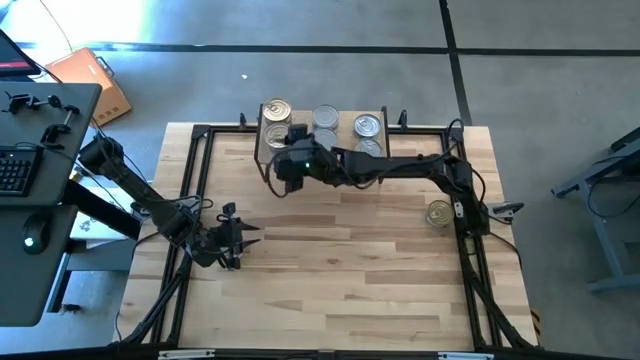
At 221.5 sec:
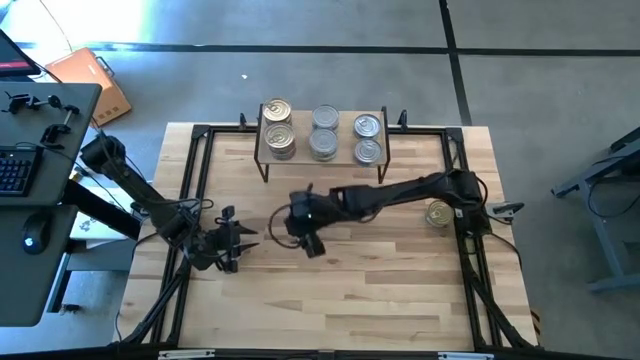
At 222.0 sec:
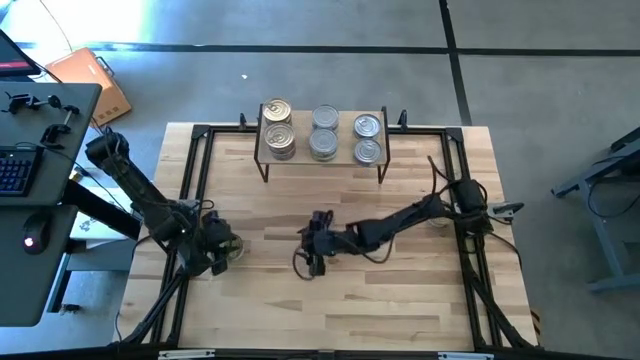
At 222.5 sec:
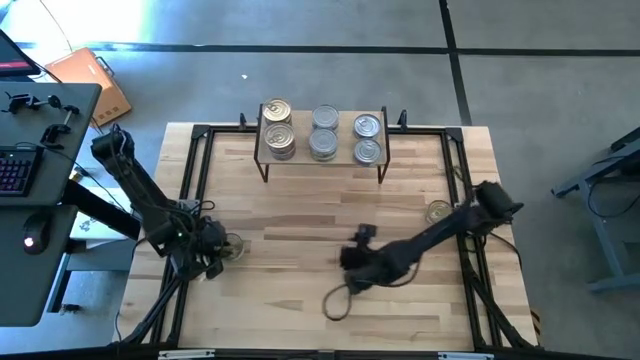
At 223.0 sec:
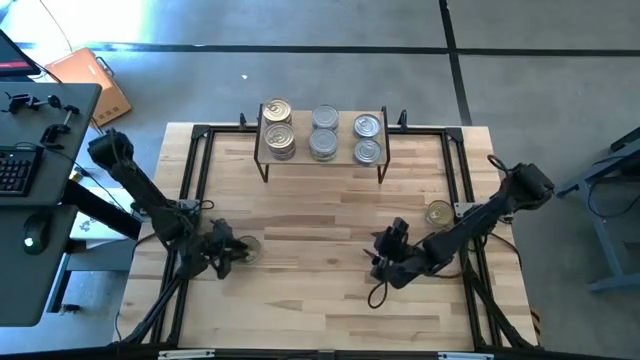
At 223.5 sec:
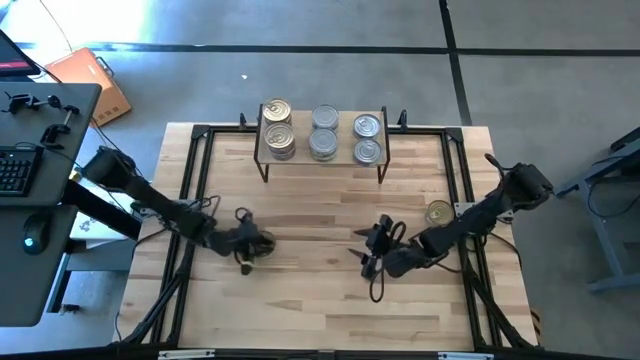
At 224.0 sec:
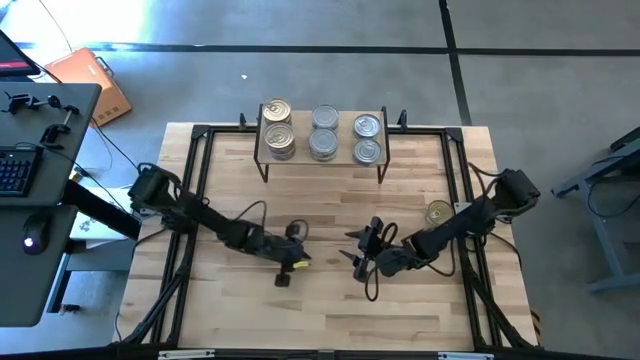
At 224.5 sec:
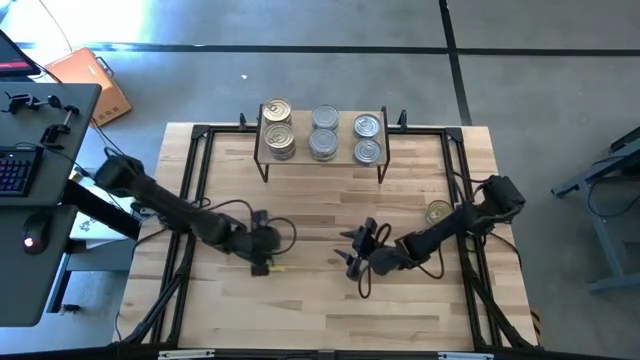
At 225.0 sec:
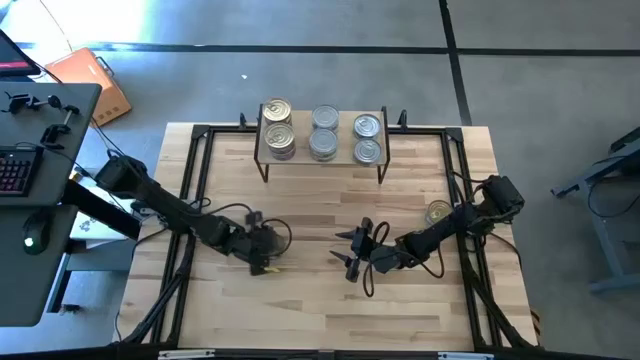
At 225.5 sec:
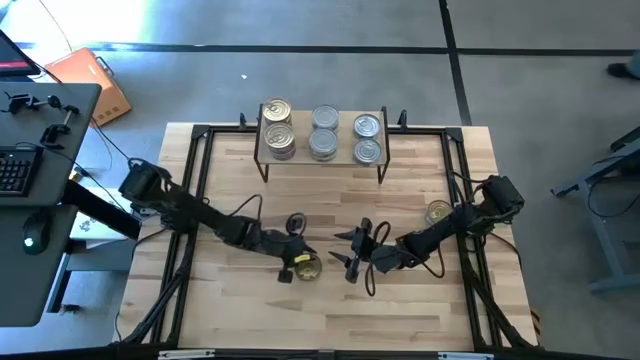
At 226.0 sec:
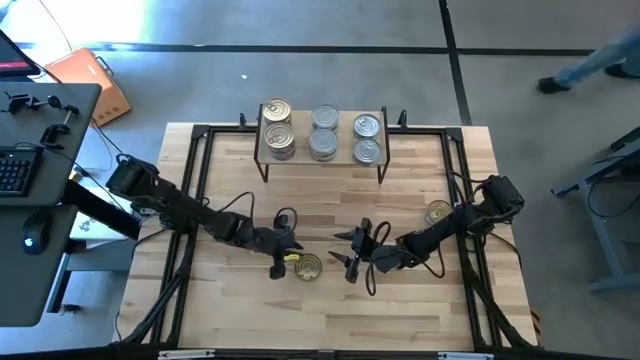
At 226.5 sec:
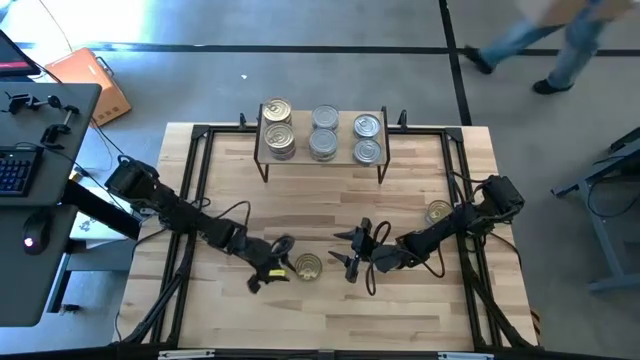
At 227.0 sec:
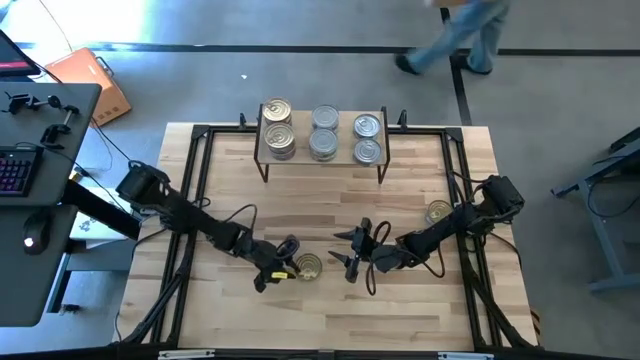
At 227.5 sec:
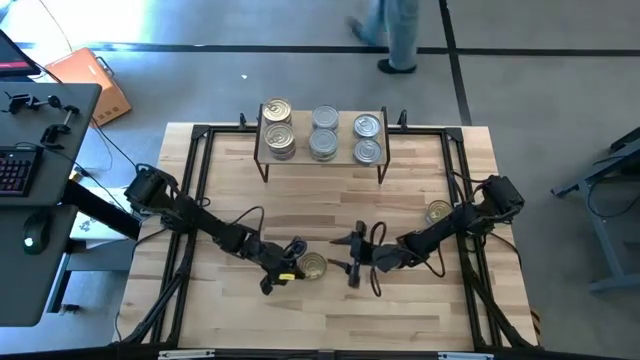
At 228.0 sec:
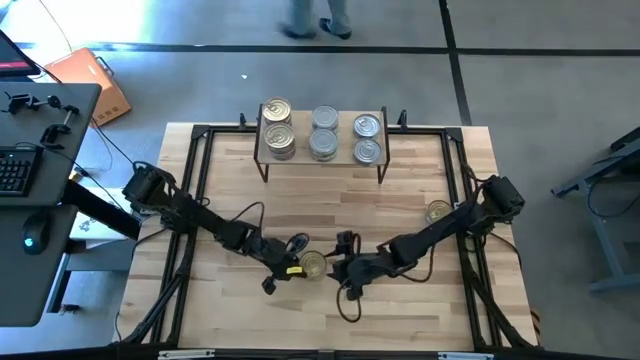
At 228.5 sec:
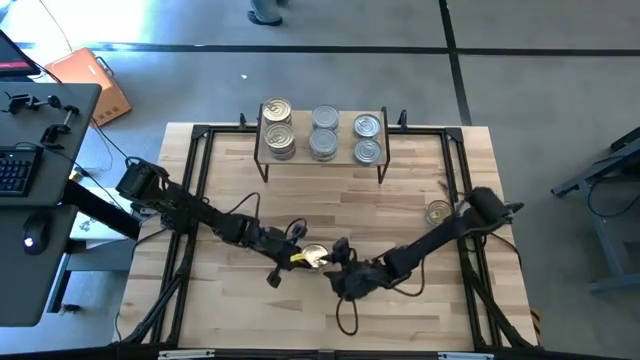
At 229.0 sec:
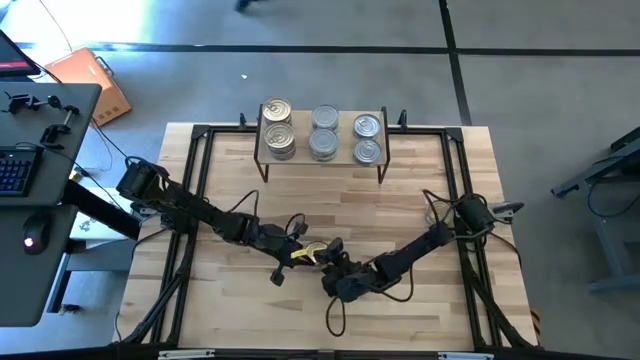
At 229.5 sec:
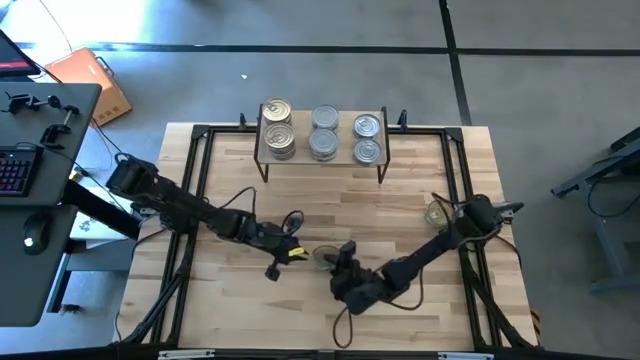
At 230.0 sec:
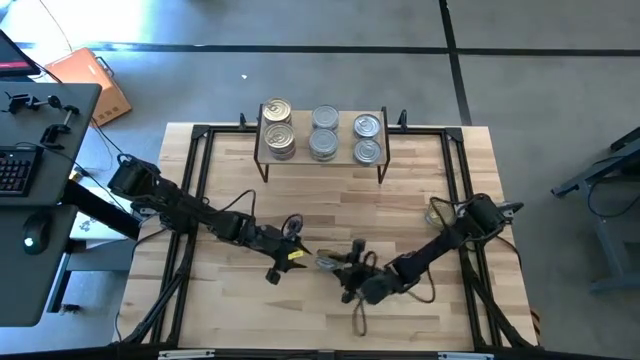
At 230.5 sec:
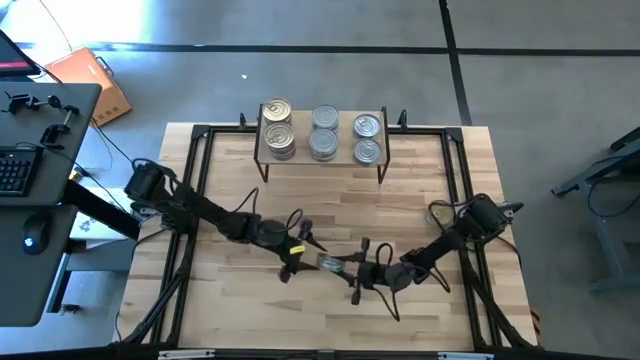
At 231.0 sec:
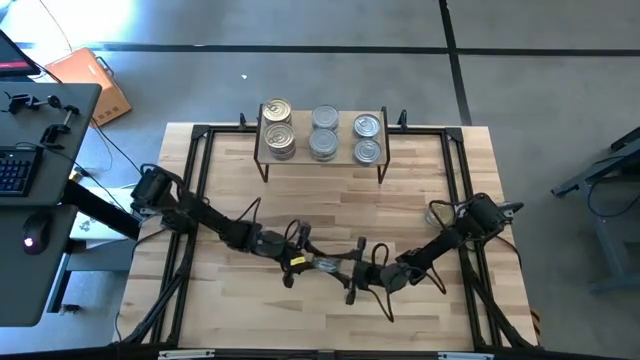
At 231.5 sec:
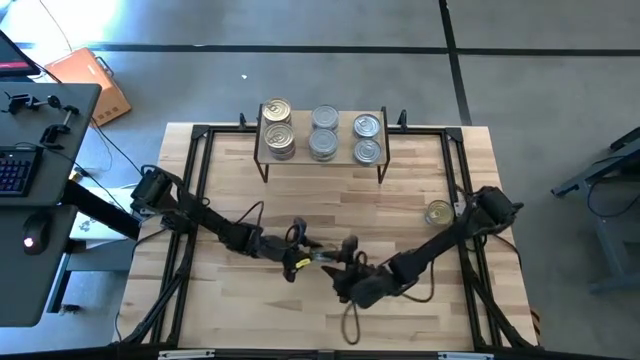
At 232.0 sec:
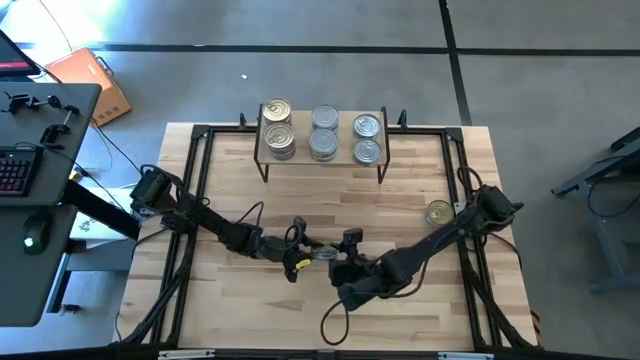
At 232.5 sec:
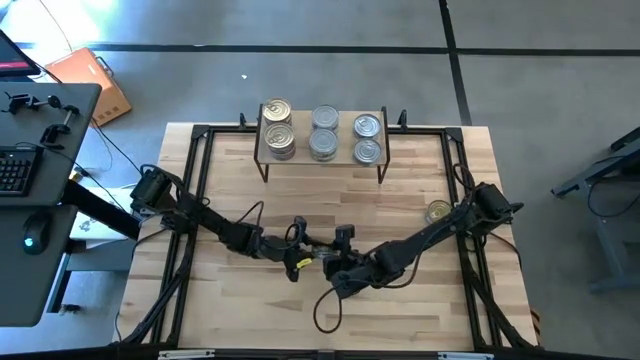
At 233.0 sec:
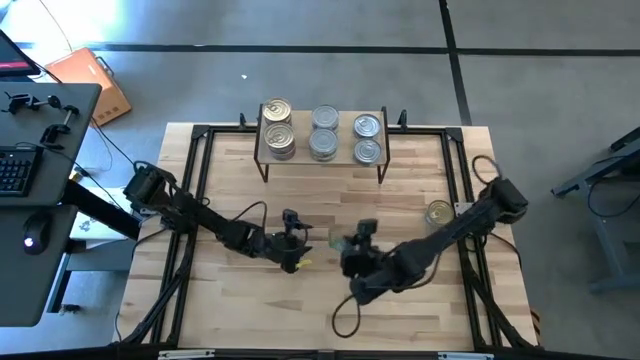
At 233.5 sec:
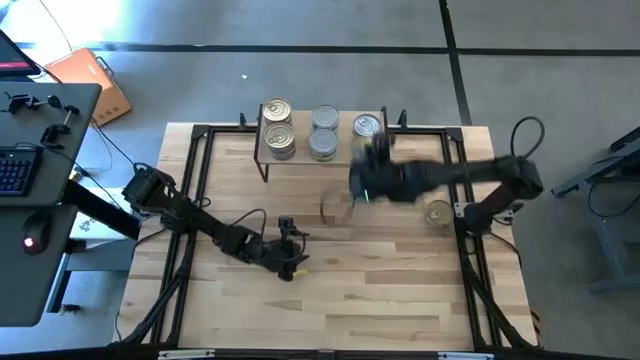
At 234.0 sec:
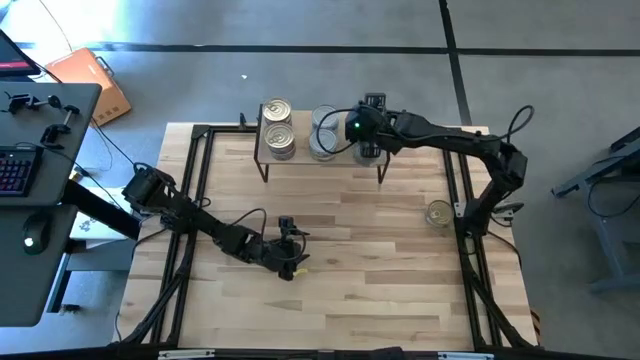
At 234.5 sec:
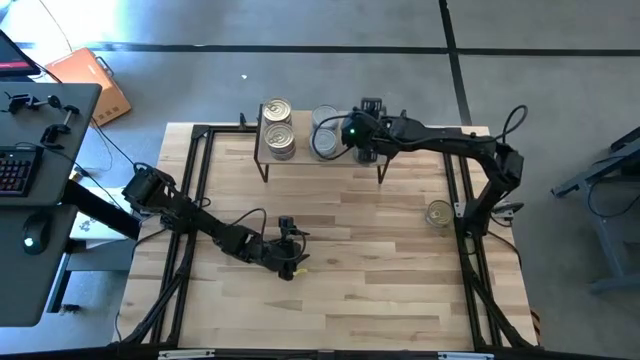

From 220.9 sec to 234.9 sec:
Task: Stack canned seafood by type on shelf
Stack the left green tuna can on top of the green tuna can on the shelf

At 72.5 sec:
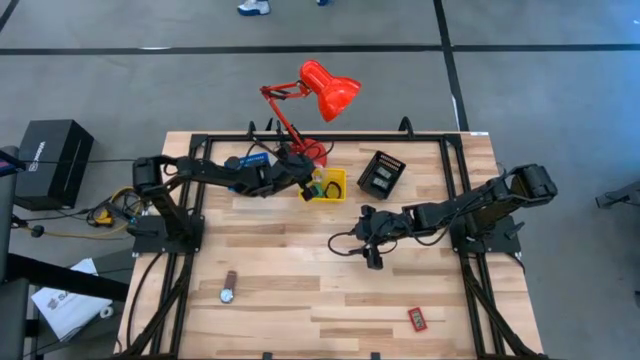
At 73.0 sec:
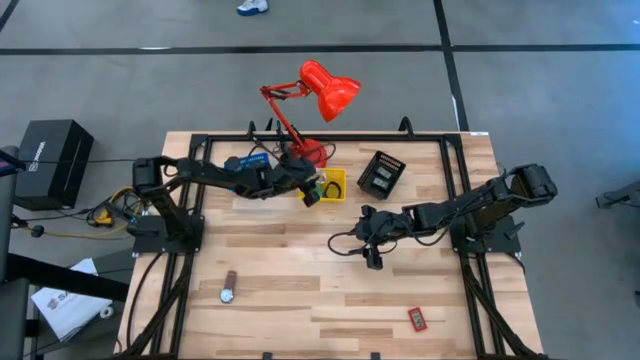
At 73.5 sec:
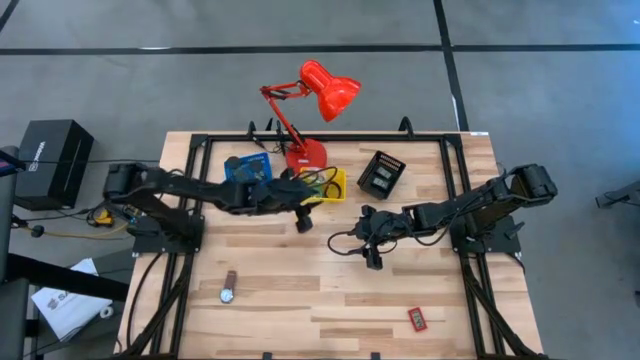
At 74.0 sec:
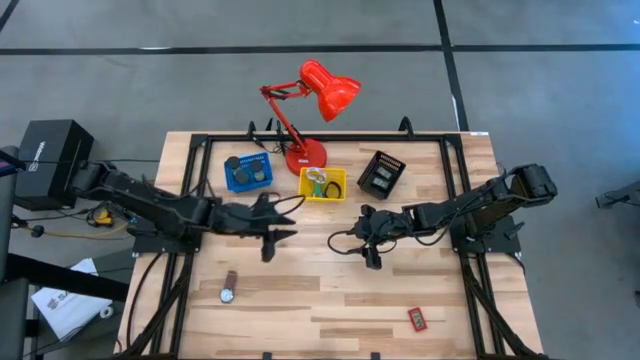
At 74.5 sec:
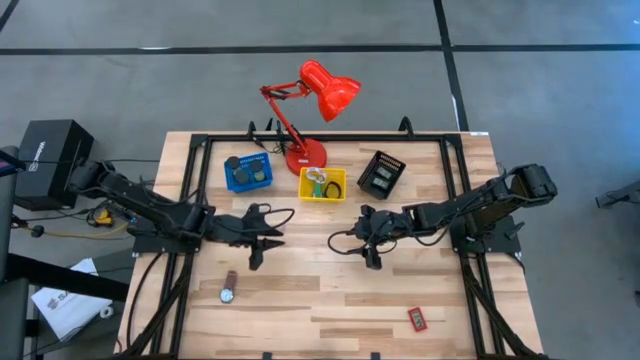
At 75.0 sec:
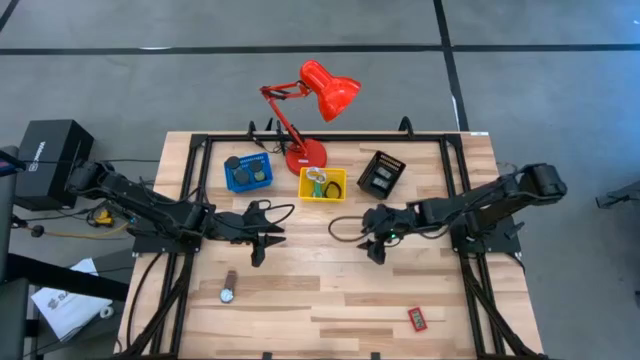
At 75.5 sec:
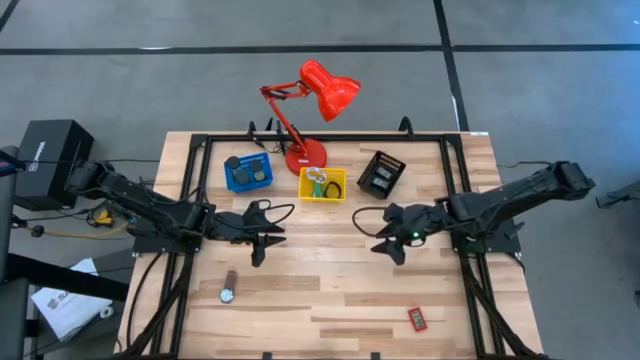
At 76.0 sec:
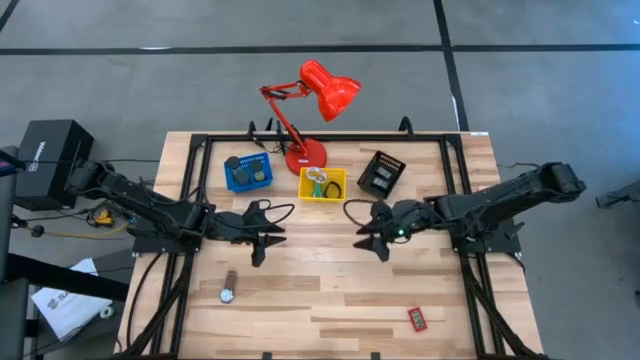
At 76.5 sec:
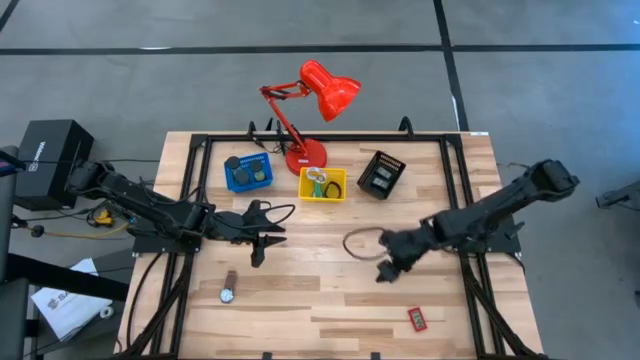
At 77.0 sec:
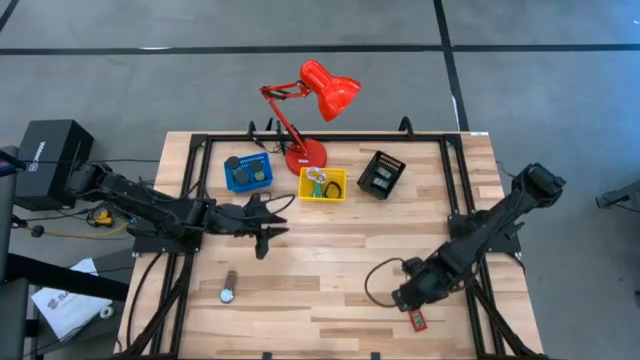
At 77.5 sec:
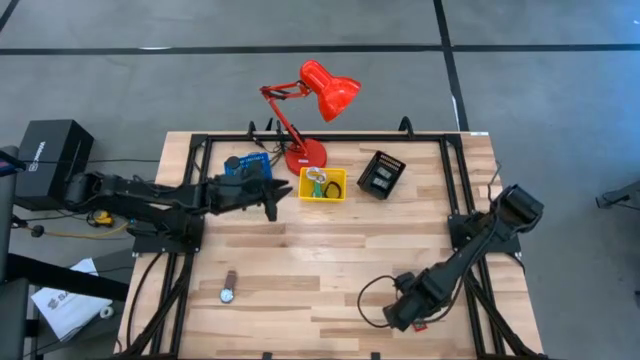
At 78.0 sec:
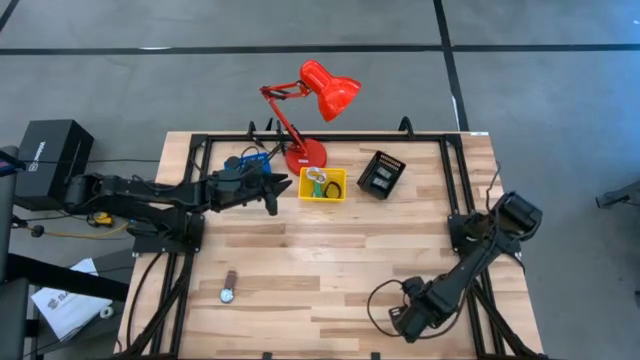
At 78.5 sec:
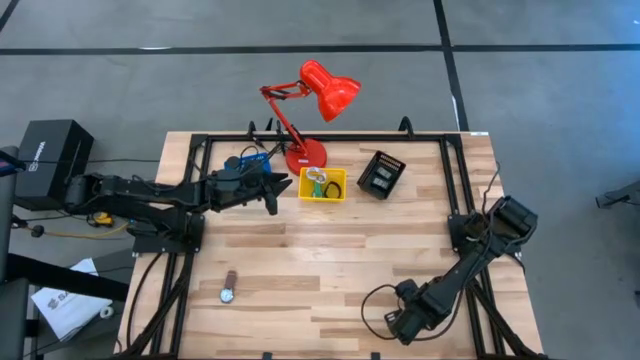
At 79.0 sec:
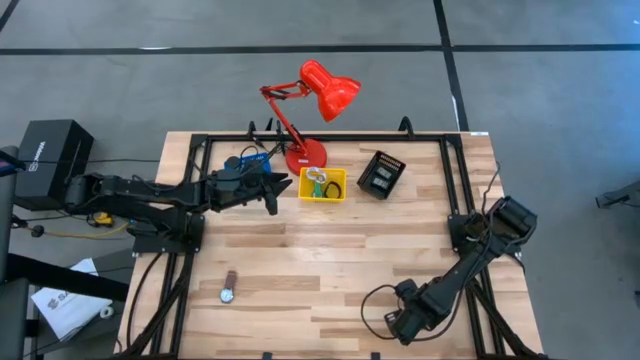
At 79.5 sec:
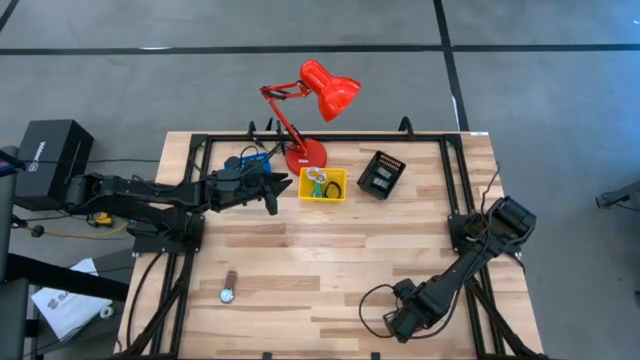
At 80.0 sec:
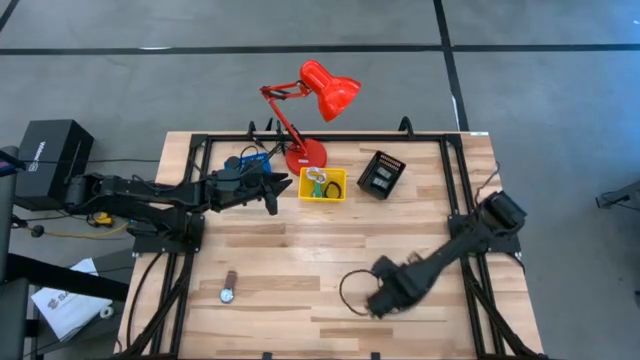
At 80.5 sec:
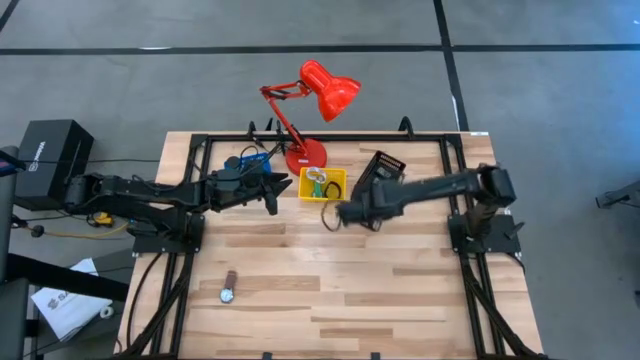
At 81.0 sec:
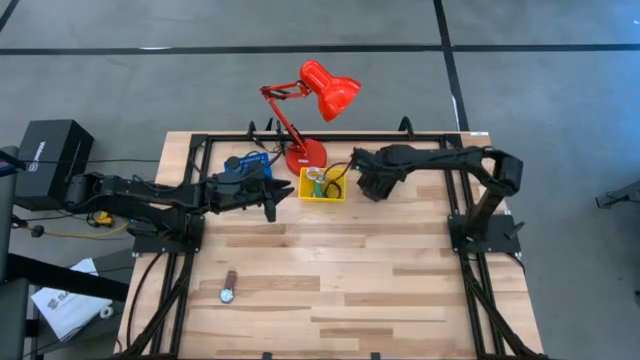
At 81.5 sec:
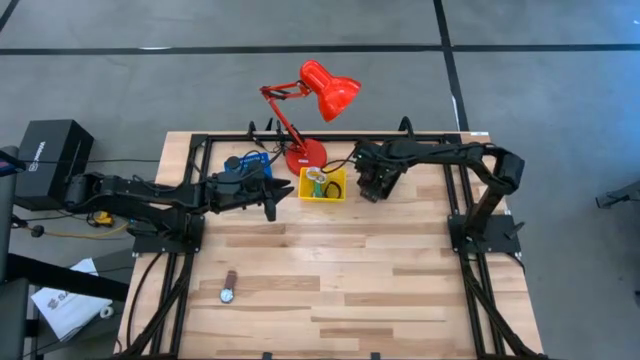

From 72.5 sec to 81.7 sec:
Task: Pick & Place Office items
Put the red digital clock into the black bin
